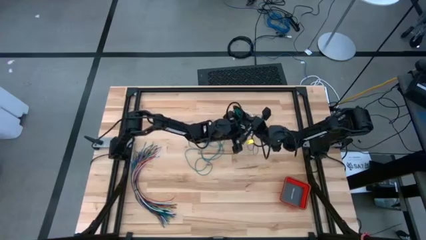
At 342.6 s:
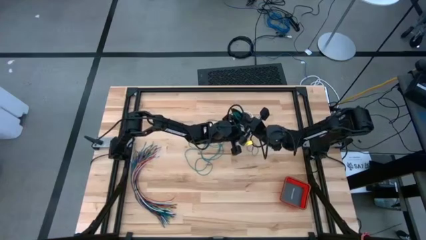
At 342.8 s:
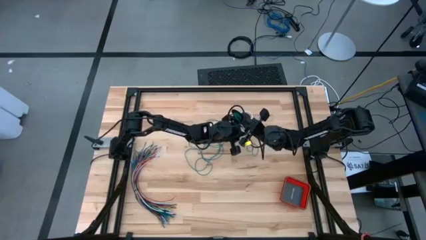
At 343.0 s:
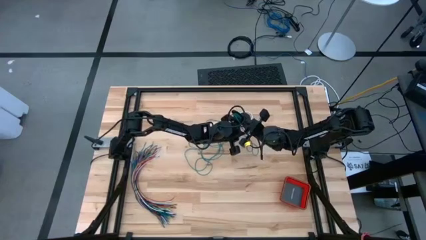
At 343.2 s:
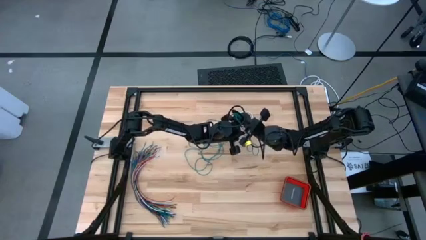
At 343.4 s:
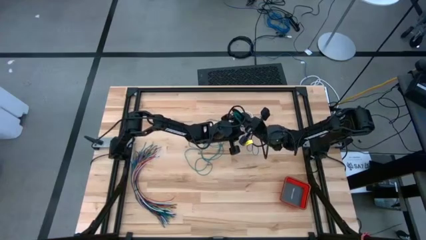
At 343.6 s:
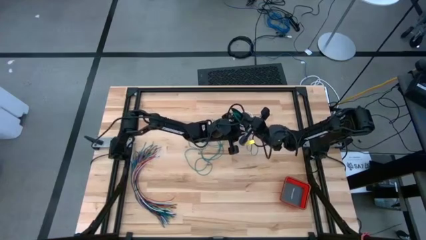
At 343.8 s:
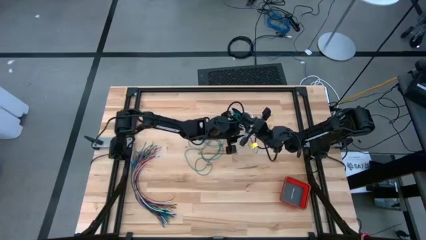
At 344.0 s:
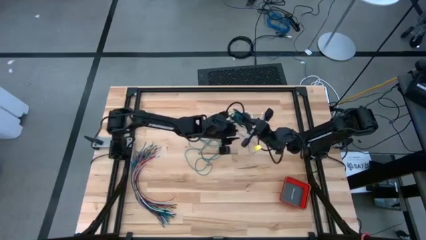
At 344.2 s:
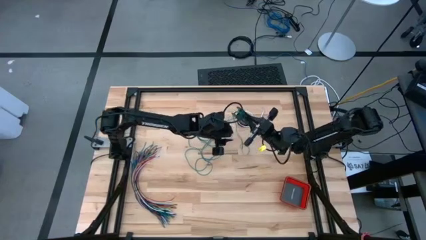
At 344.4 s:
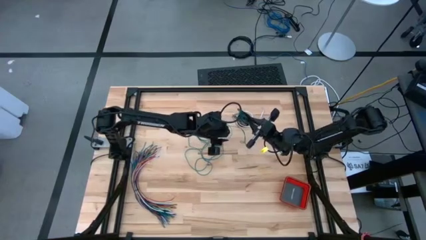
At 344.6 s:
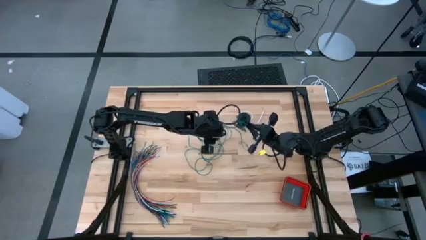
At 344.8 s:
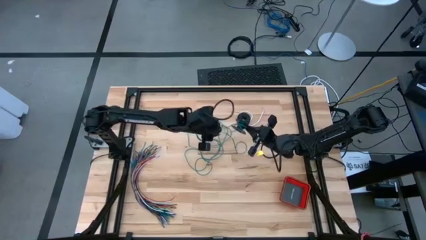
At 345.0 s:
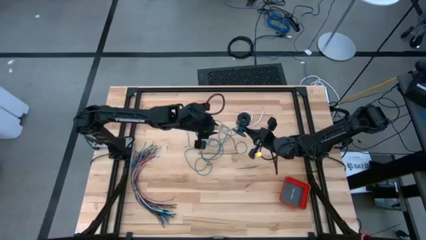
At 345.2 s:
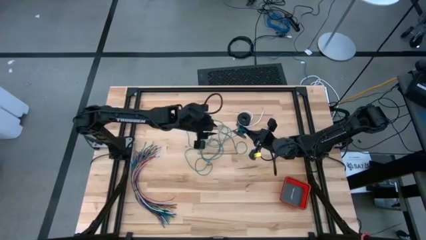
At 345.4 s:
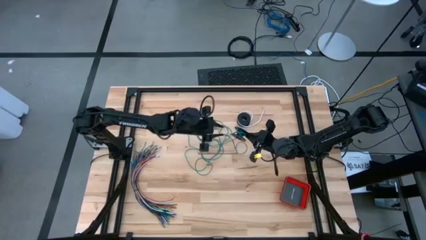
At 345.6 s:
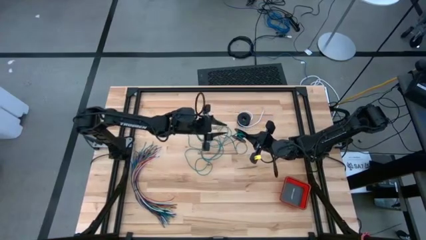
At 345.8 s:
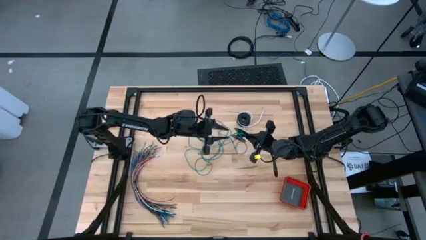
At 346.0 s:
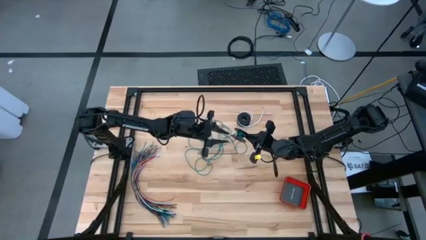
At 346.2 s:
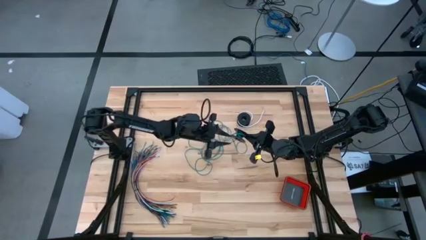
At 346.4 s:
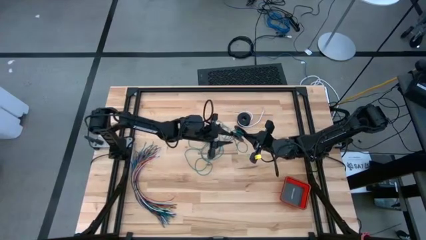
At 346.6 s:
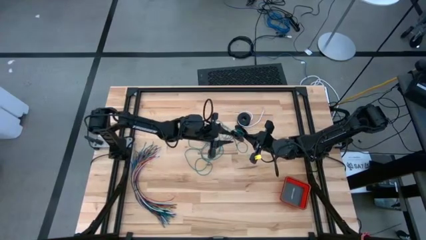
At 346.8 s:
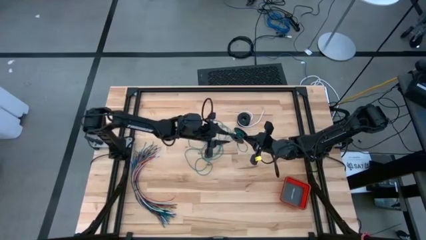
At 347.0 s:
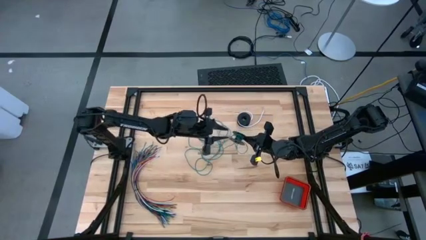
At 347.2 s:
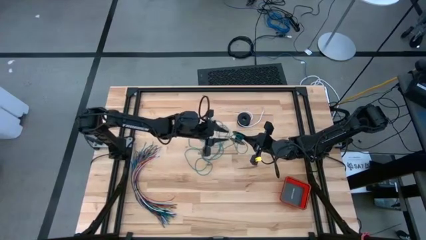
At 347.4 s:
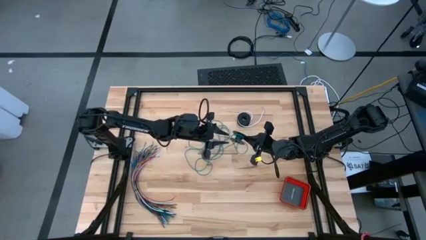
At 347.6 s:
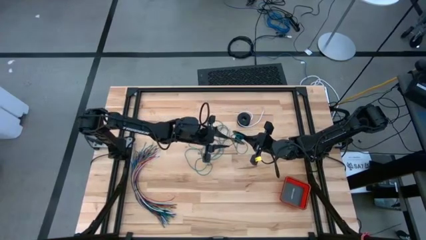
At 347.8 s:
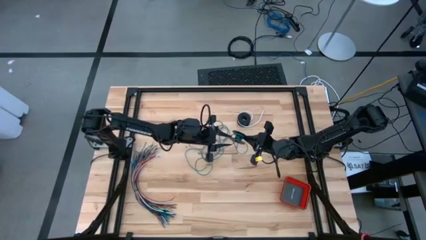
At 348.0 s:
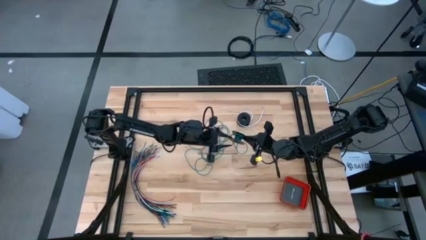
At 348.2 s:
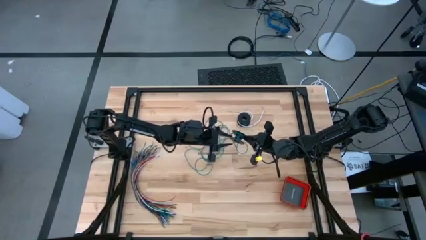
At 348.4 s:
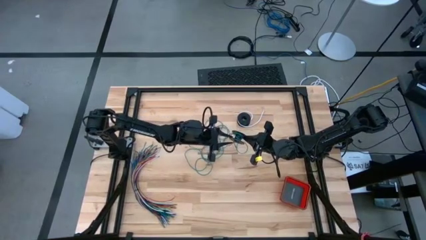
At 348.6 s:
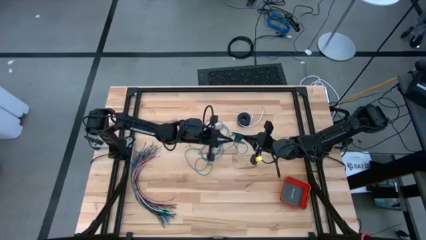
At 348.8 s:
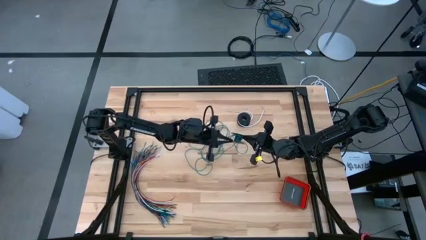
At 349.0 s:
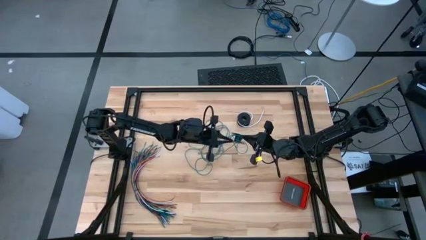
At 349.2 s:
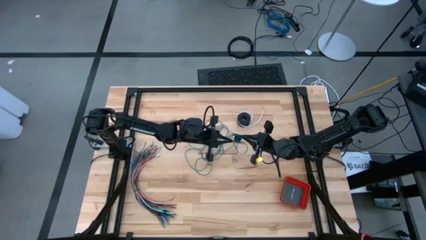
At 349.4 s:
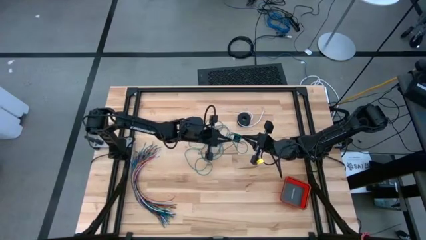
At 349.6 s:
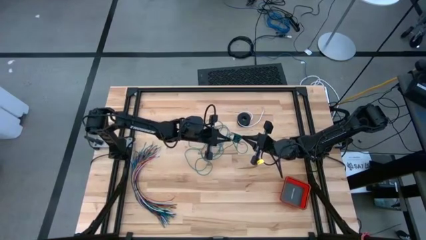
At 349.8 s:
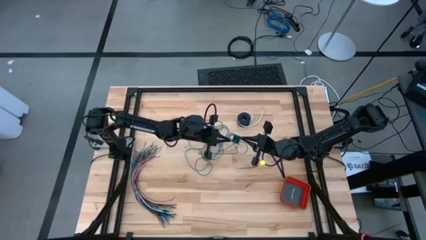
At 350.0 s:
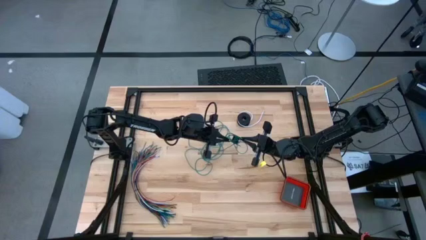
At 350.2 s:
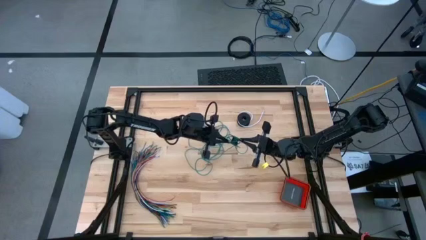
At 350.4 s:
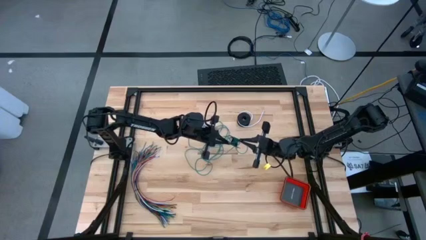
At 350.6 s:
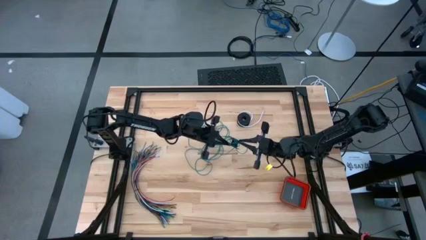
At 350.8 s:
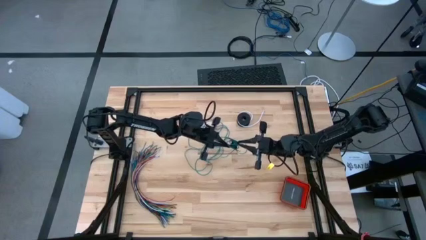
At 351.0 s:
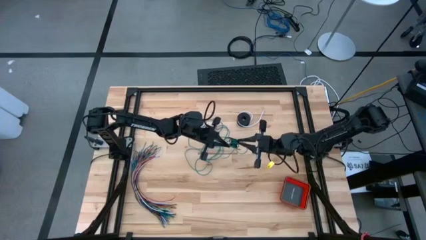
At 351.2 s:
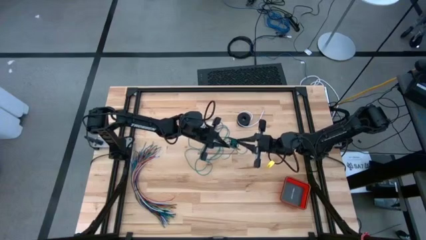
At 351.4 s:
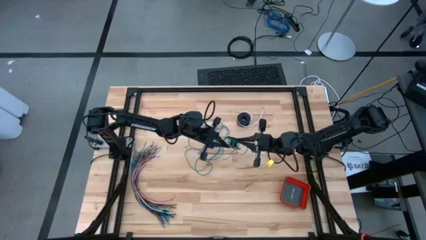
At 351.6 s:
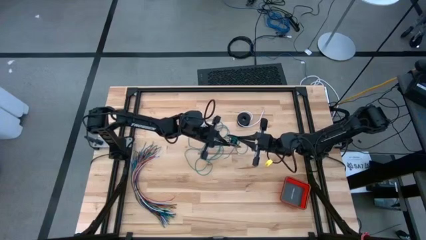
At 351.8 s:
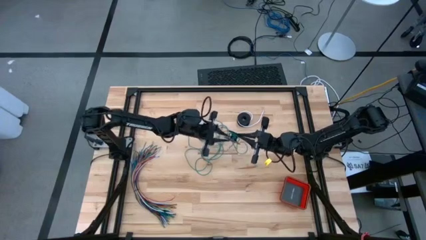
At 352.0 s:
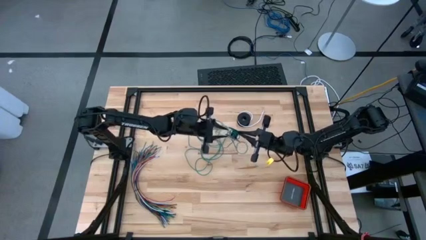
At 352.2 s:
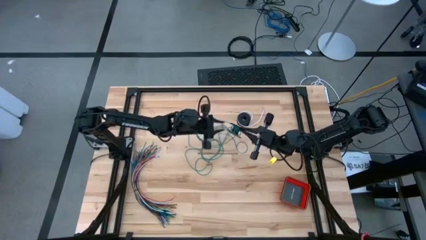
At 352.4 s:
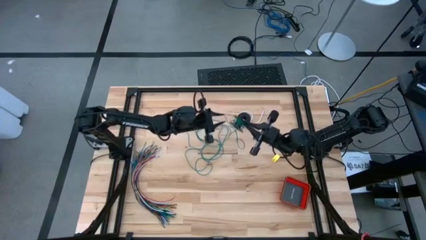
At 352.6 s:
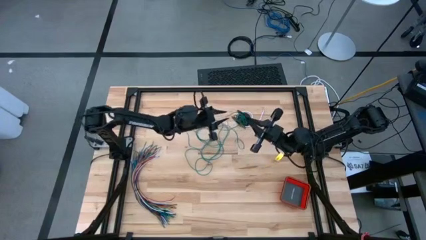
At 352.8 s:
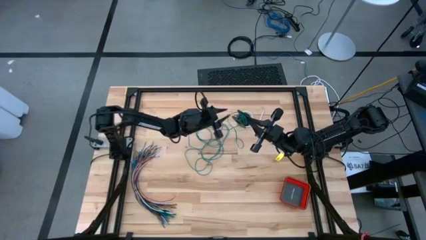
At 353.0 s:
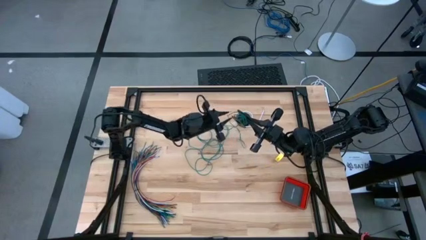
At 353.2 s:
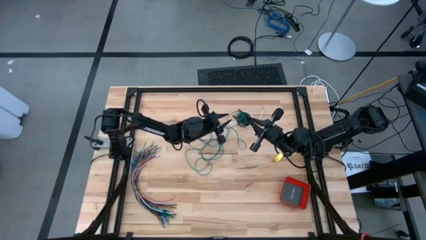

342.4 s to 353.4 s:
Task: Coil cords
Coil the green wire onto the spool

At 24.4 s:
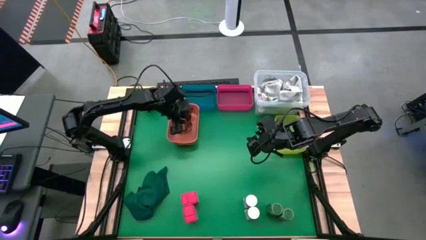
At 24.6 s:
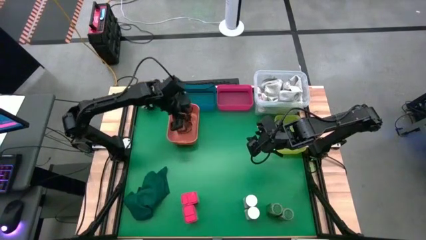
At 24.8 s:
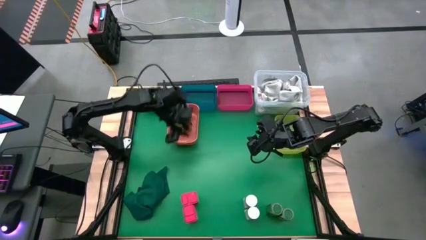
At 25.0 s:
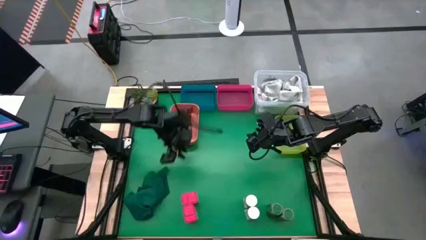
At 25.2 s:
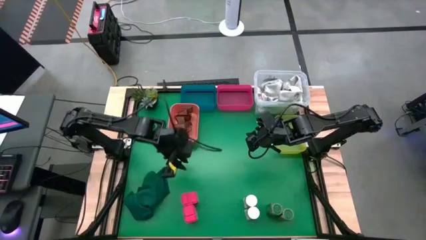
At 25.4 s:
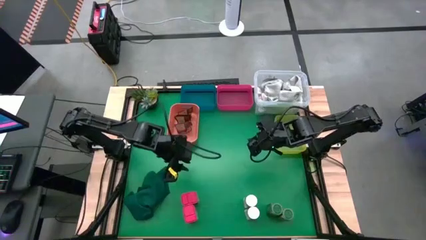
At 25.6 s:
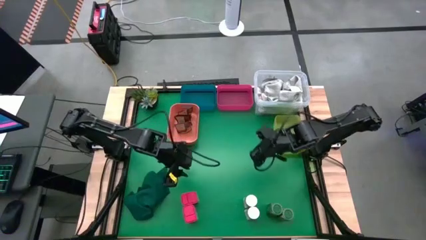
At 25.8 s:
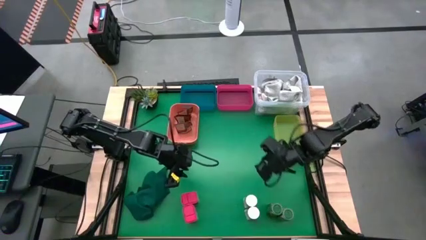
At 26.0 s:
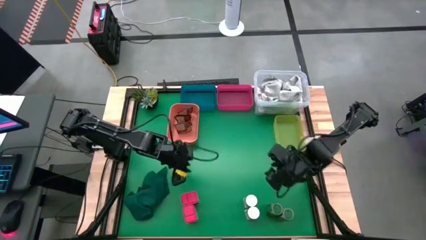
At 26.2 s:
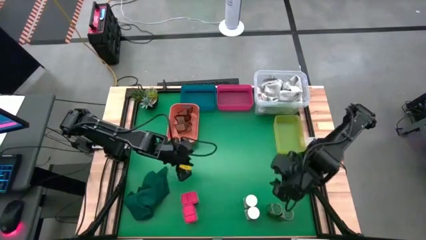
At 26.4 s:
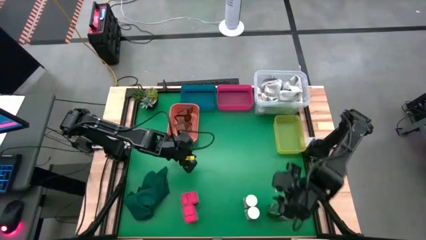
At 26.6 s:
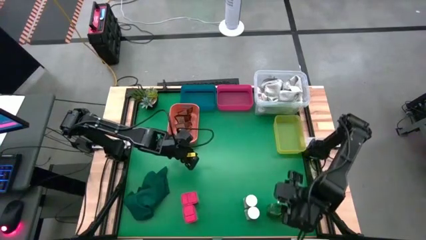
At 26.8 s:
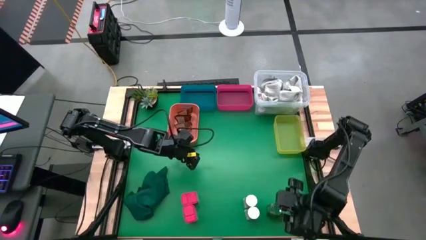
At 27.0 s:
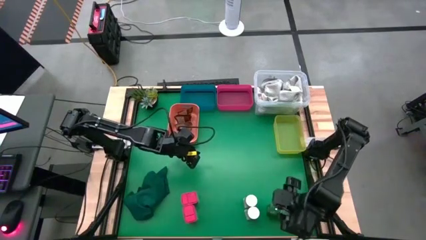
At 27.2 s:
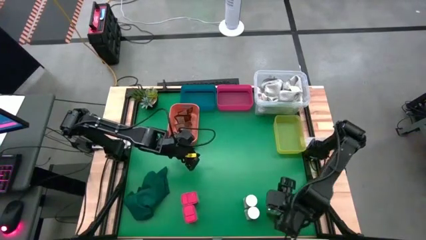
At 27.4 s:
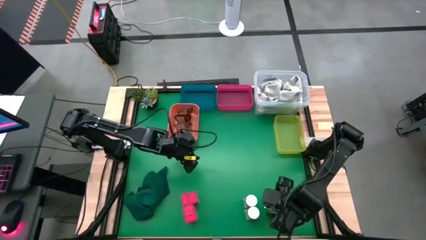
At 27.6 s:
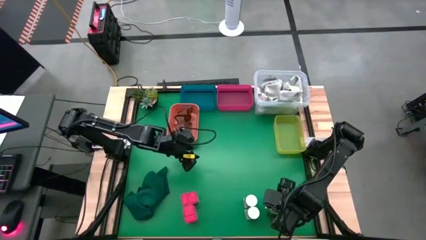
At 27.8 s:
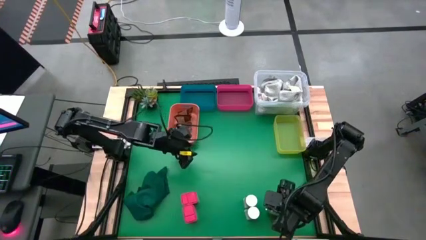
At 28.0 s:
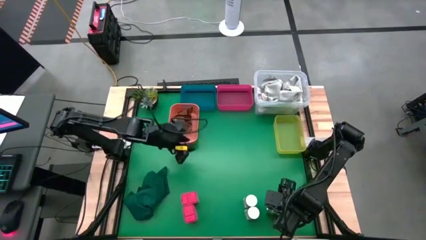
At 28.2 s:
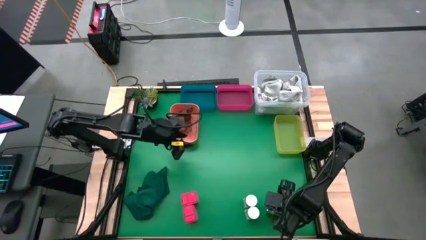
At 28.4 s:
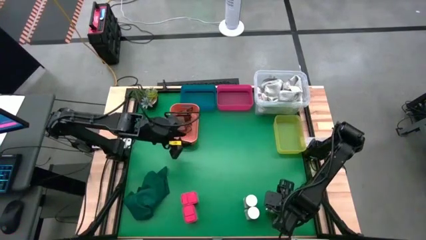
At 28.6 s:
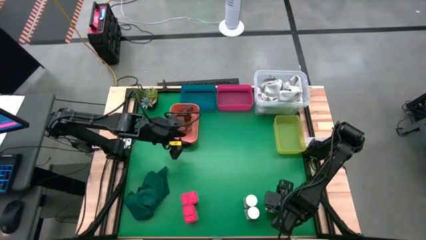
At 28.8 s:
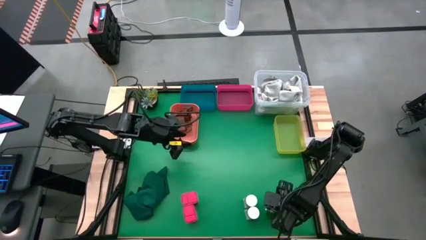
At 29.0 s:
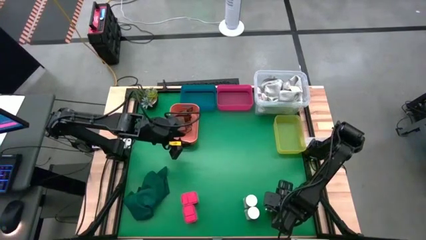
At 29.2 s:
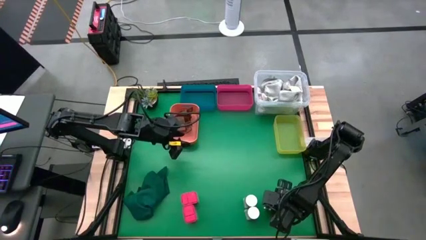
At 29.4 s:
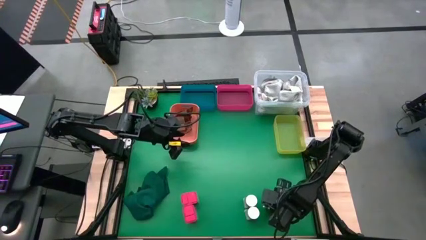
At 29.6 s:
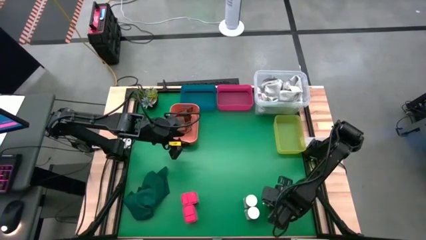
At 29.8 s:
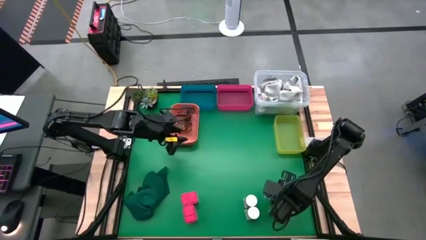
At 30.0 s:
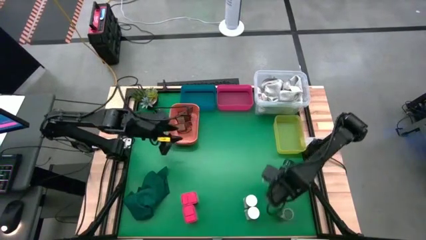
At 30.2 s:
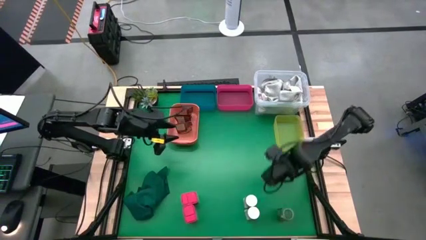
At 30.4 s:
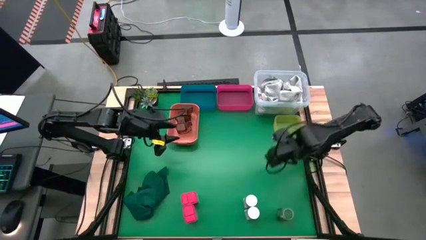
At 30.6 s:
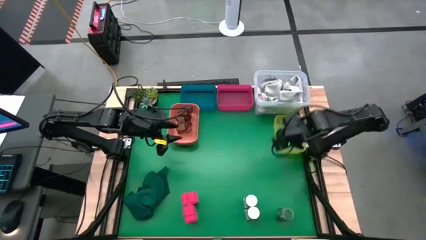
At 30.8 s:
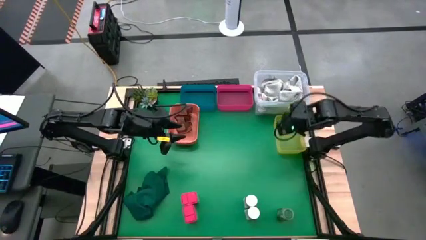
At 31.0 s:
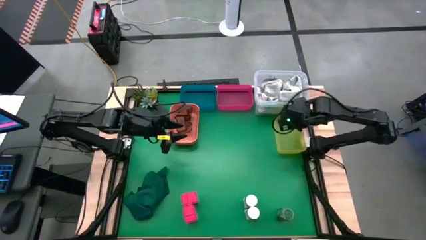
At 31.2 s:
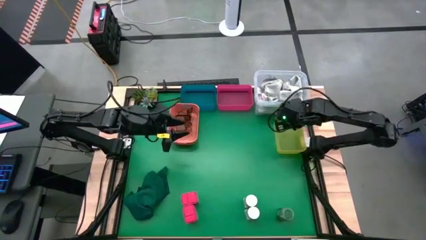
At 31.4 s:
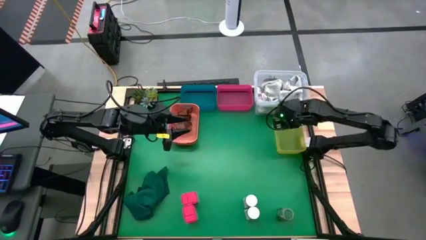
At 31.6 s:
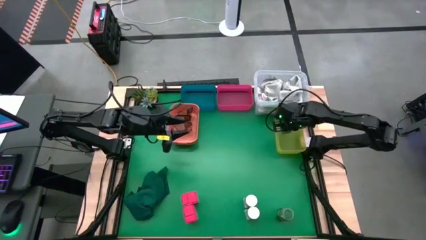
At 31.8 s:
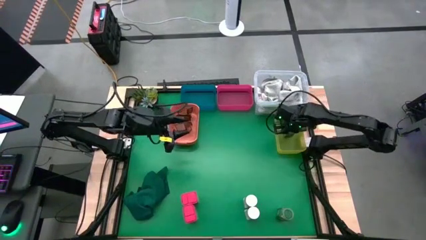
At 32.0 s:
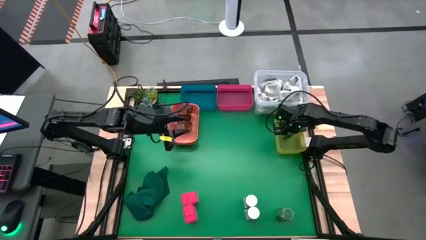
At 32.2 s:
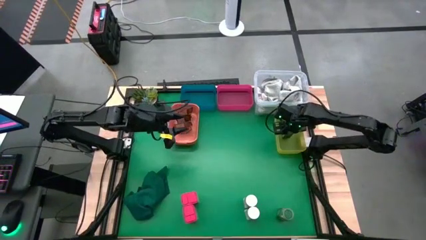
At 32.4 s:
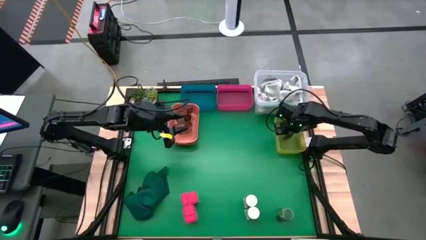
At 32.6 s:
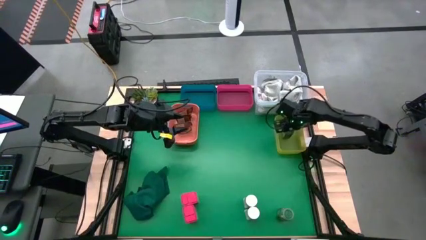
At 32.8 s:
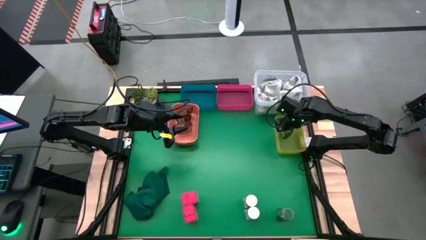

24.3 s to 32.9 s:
Task: Sort spices by type
Put the left green spice bottle into the yellow bin
